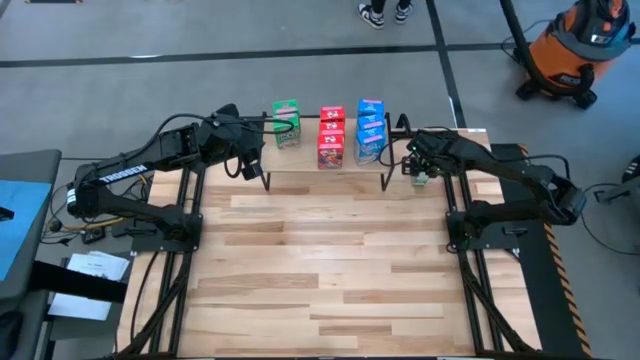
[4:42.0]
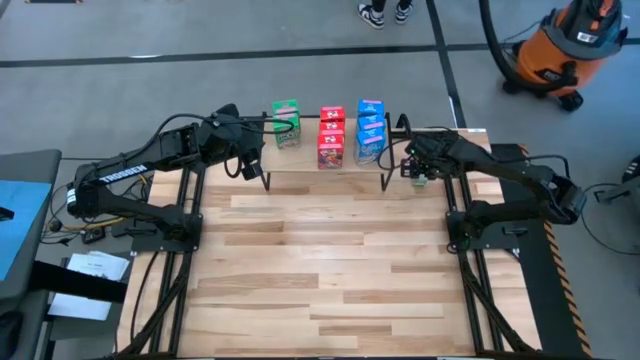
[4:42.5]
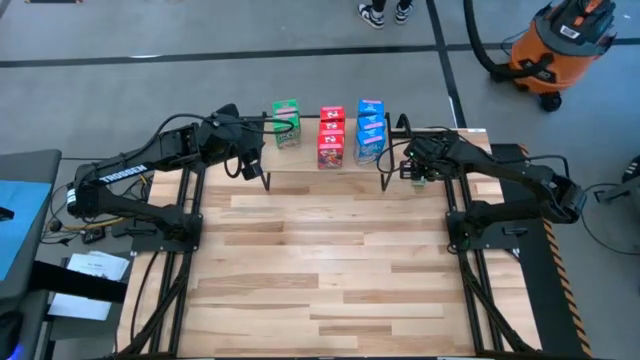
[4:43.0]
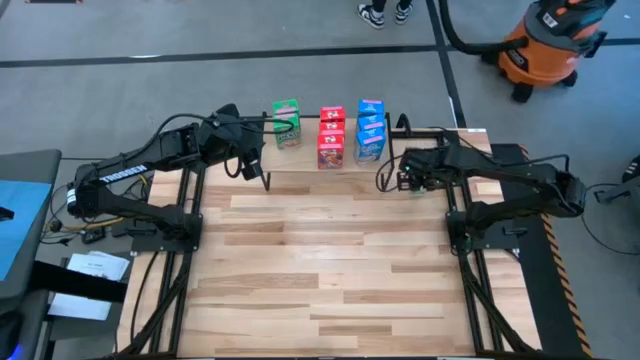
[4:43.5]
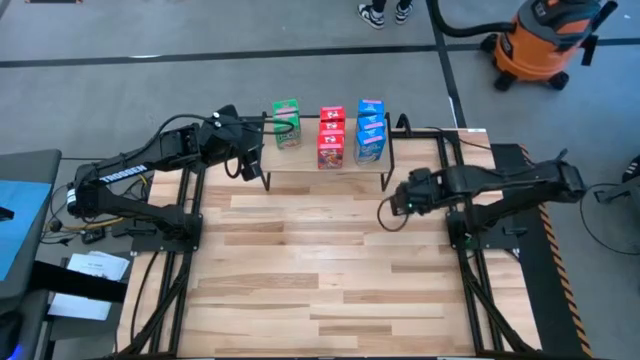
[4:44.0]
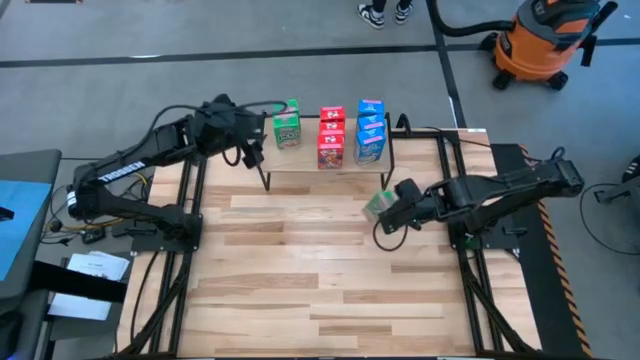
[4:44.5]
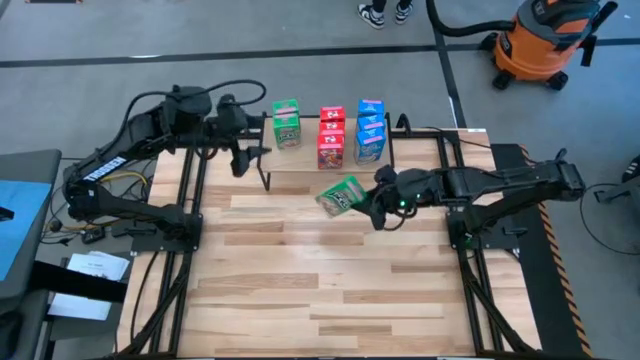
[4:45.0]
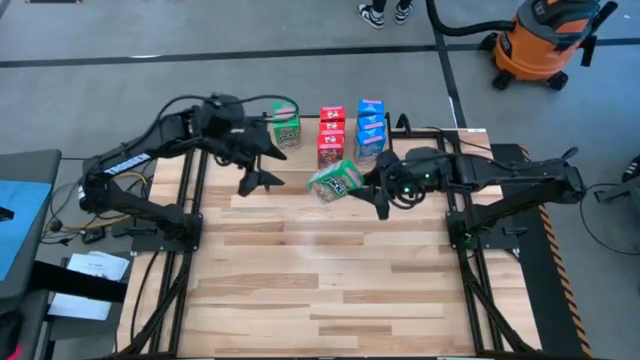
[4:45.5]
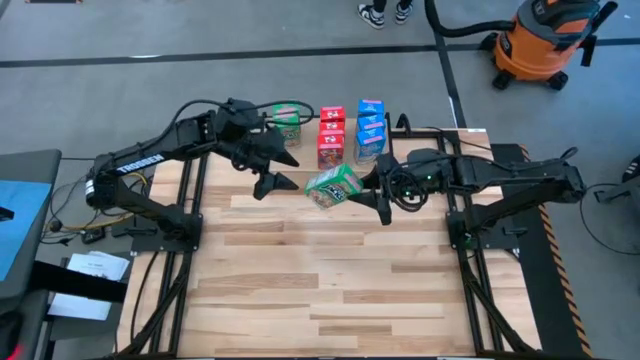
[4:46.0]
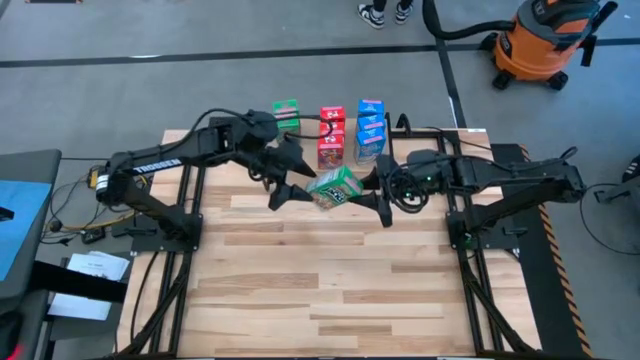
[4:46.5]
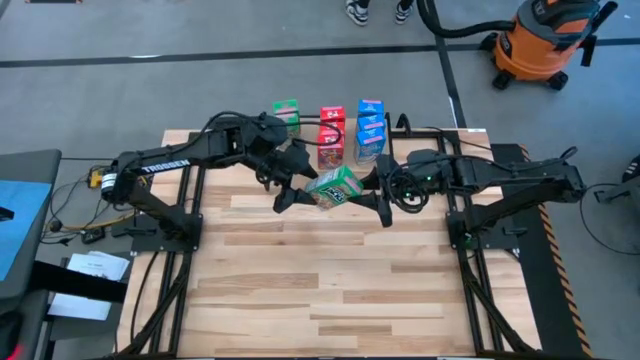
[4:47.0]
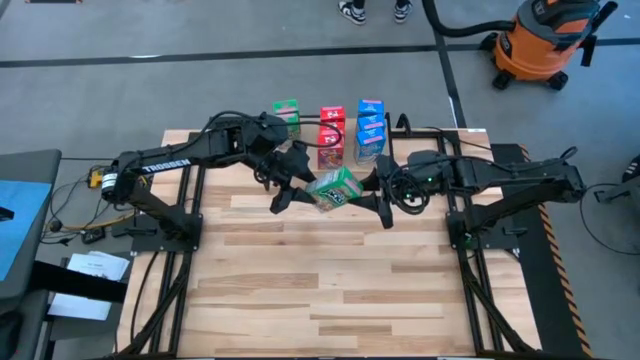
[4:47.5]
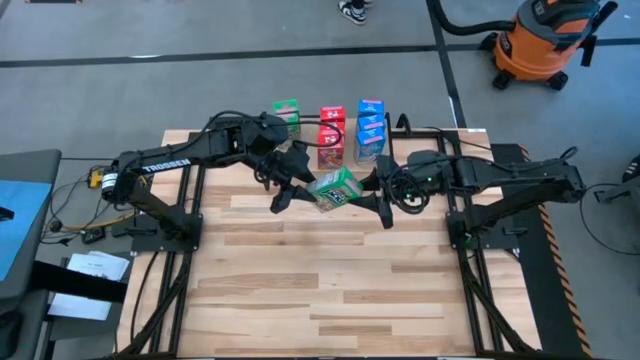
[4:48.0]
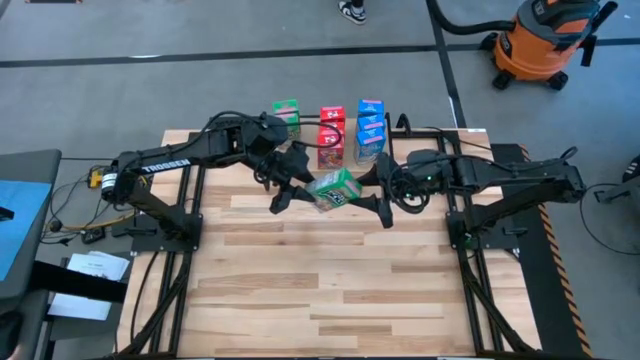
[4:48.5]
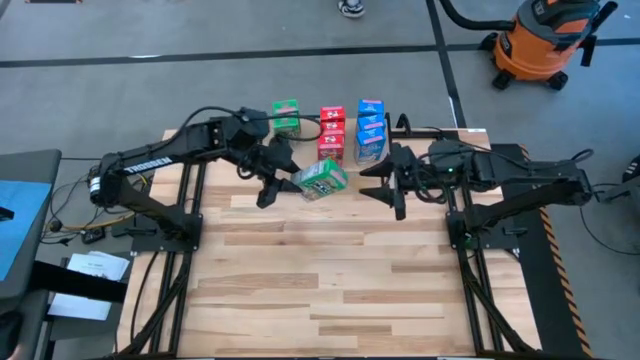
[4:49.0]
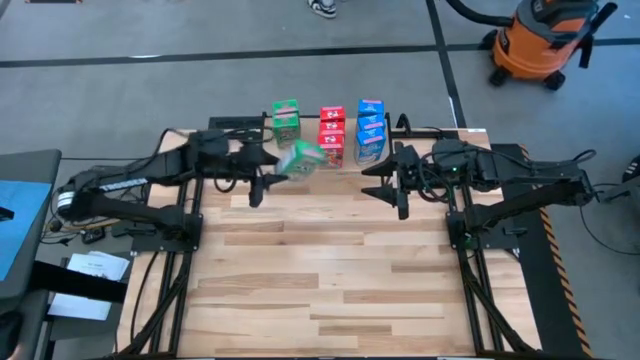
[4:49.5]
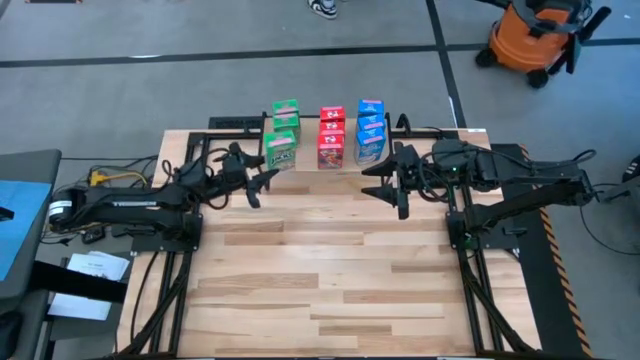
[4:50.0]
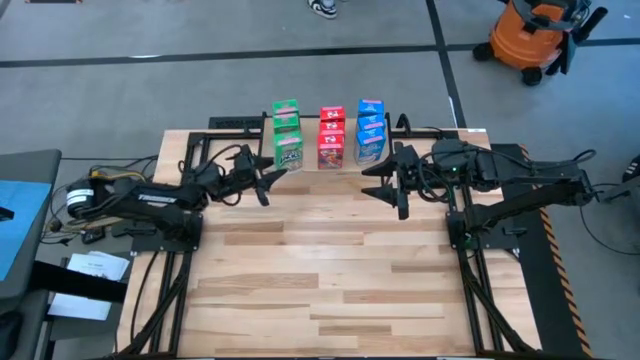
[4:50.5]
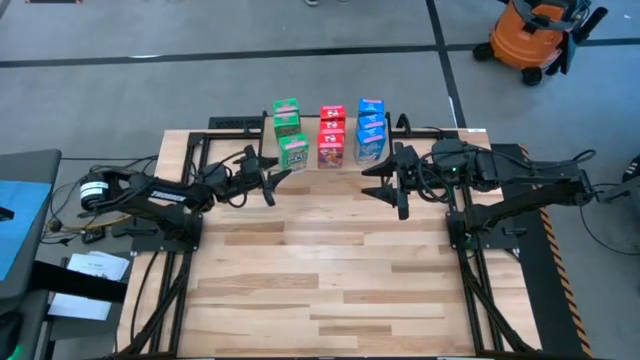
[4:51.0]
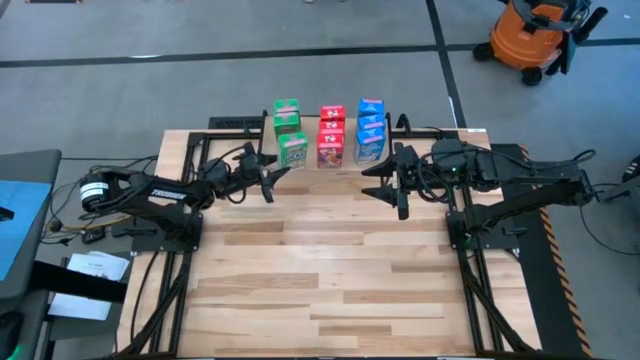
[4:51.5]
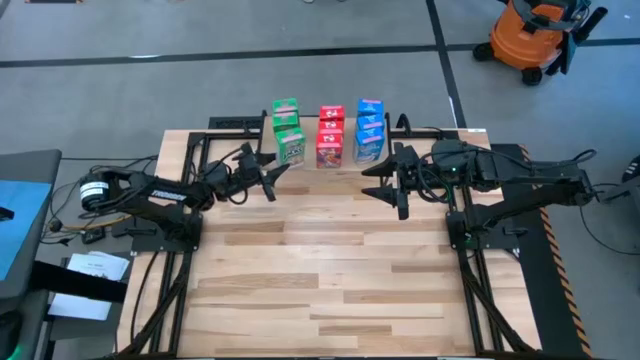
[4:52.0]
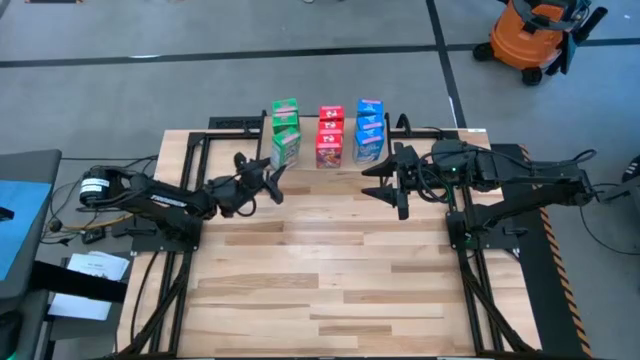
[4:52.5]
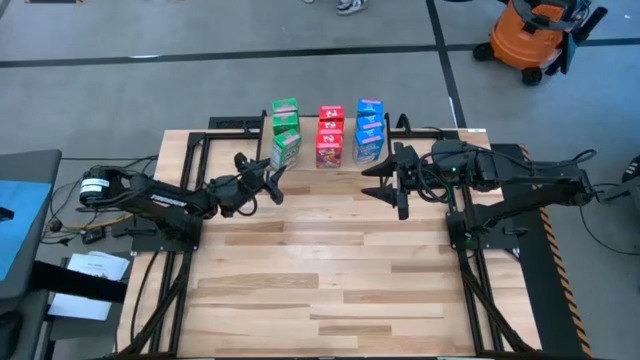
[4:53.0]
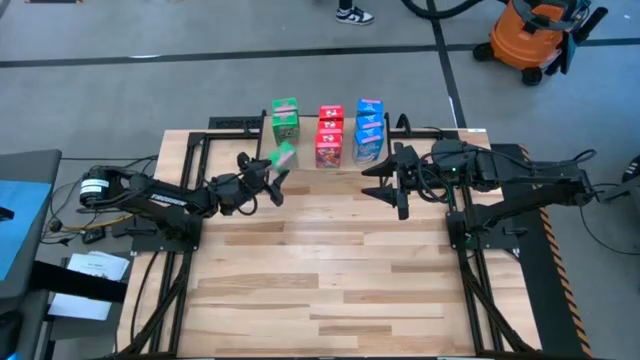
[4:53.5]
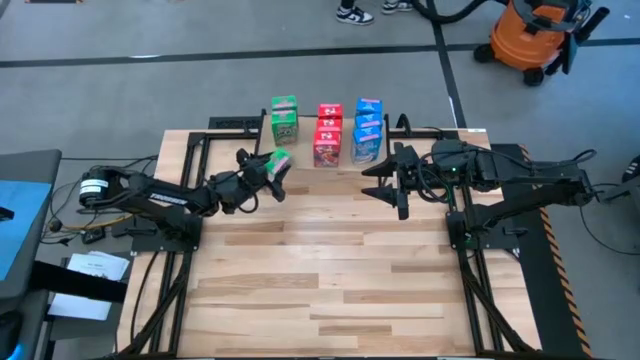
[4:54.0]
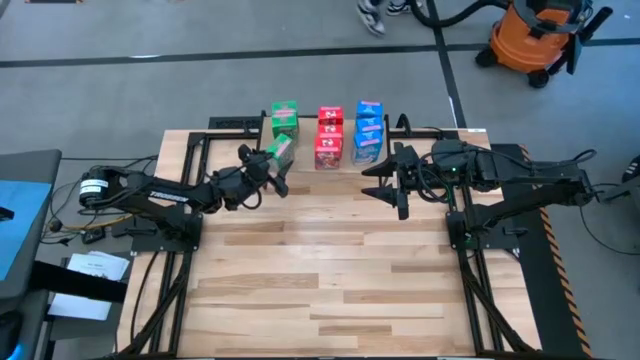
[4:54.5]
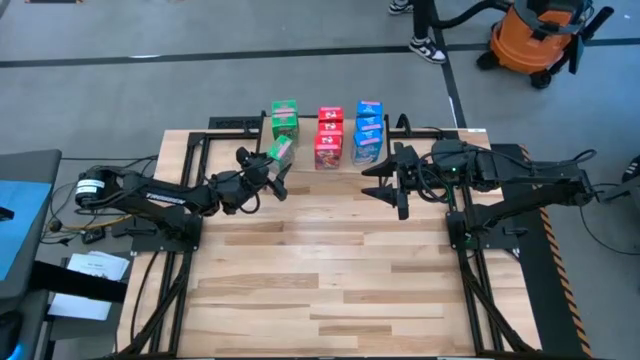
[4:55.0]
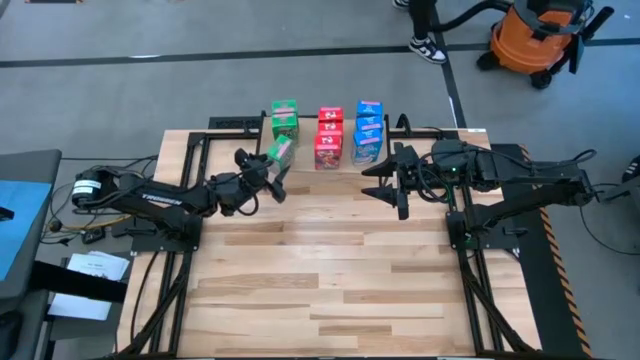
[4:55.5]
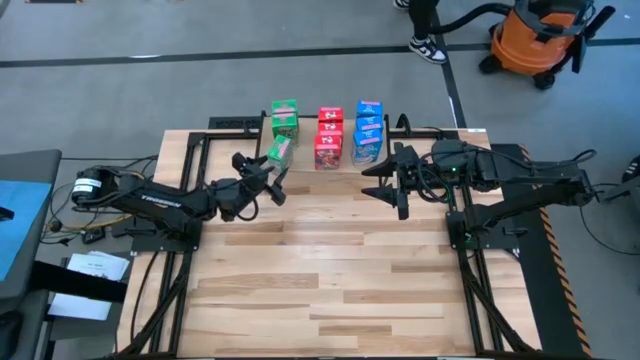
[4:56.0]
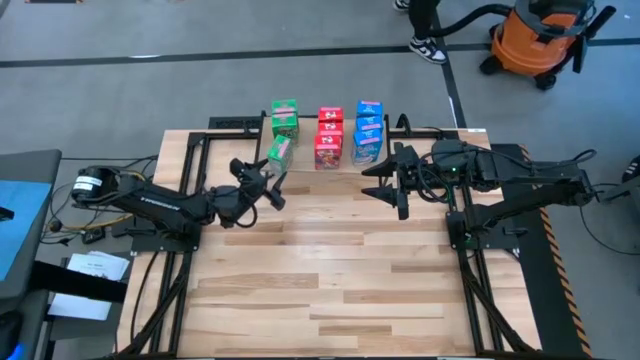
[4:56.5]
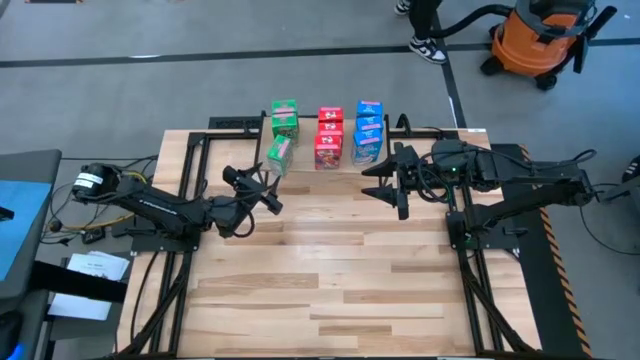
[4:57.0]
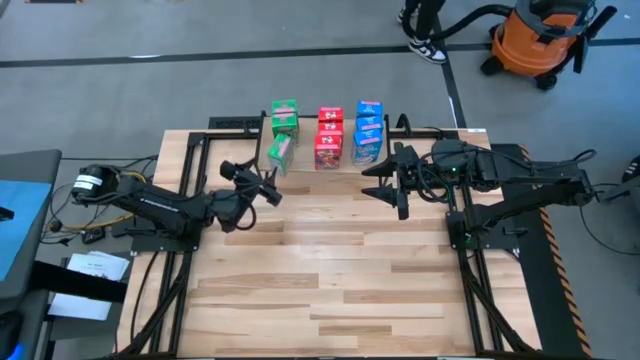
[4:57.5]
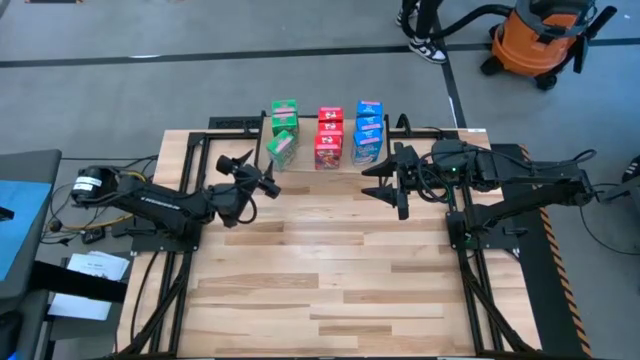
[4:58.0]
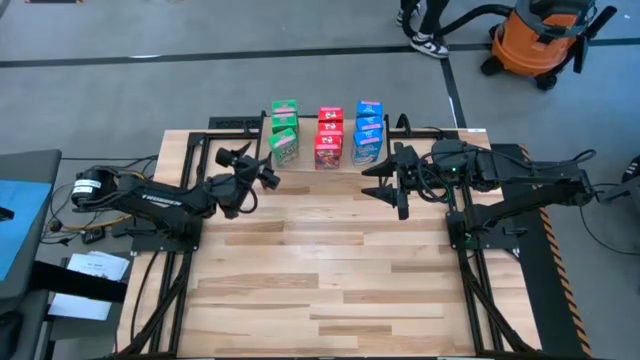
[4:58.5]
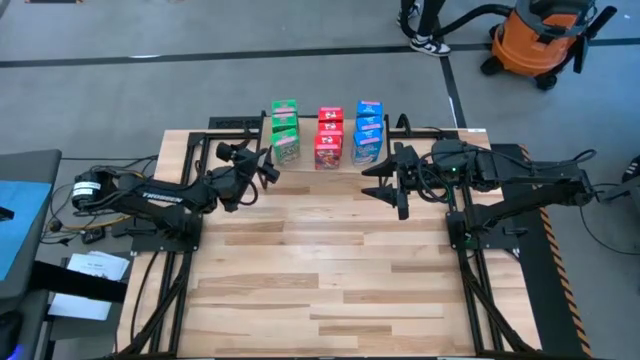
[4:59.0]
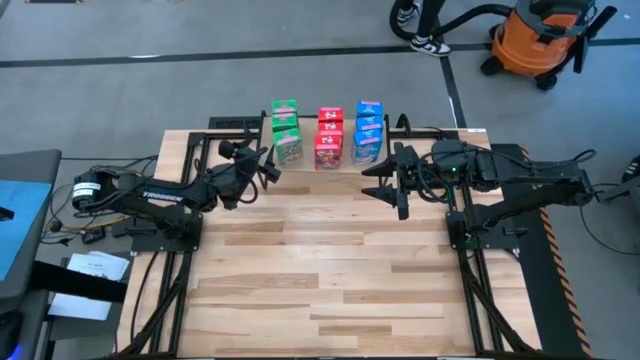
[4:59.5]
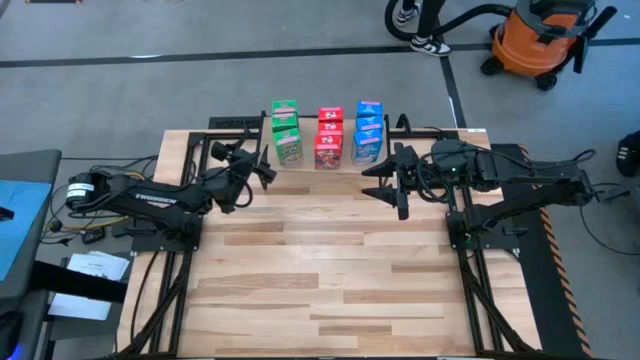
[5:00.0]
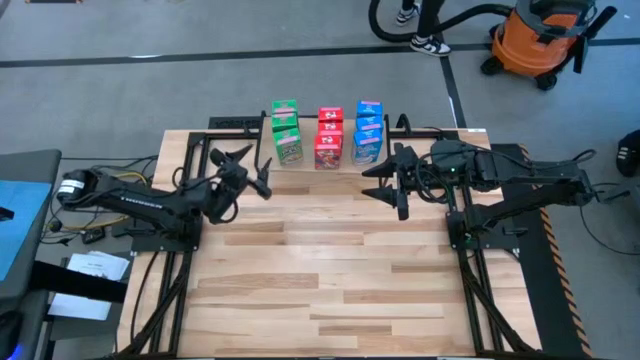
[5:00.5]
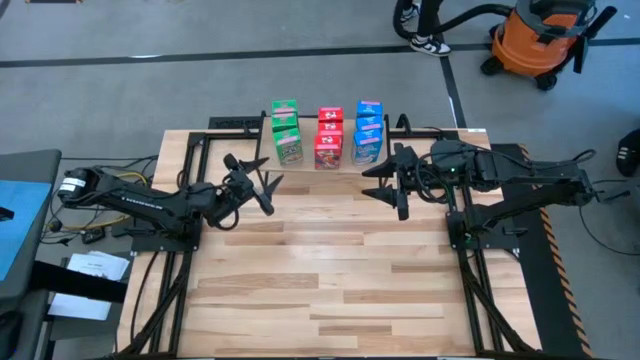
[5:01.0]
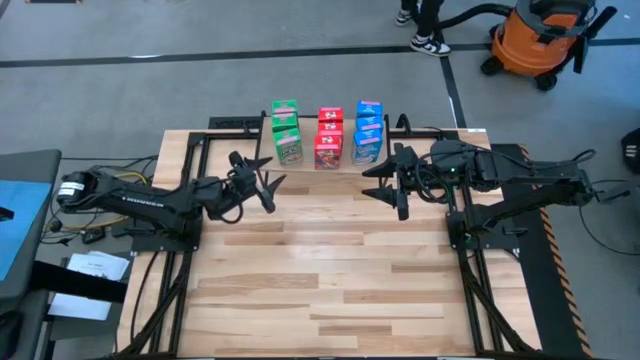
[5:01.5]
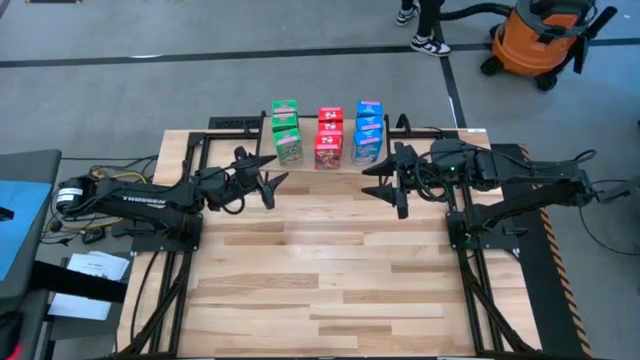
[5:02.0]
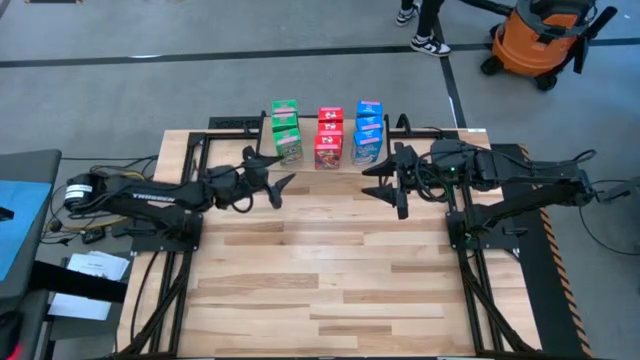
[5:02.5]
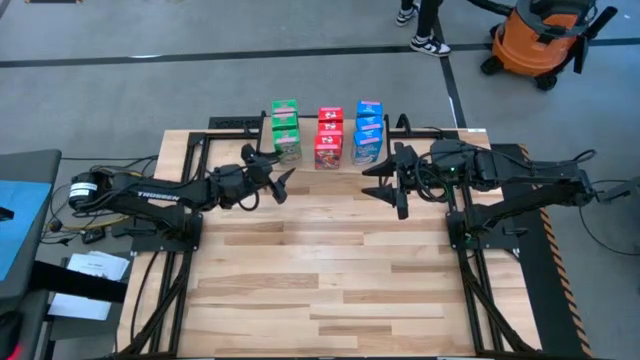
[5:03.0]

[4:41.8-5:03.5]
Task: Stack cereal on shelf
Put the green cereal on the shelf aligned with the other green cereal box
